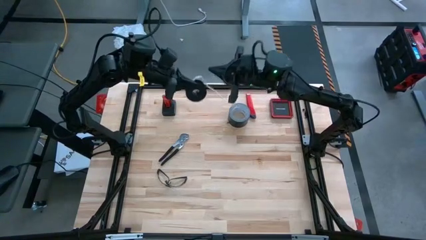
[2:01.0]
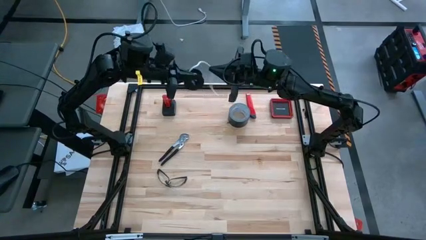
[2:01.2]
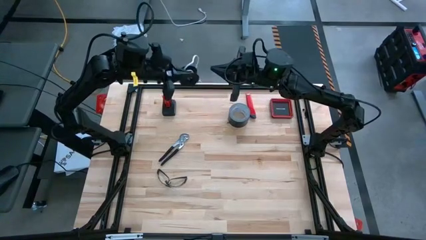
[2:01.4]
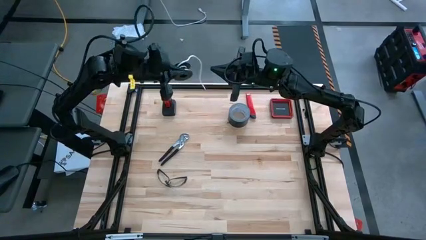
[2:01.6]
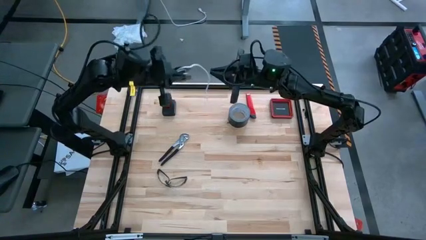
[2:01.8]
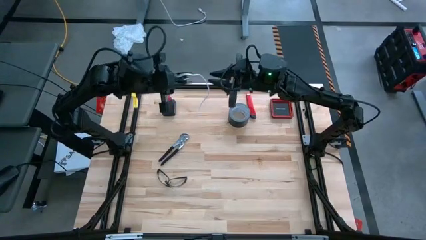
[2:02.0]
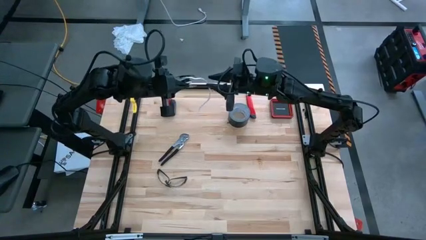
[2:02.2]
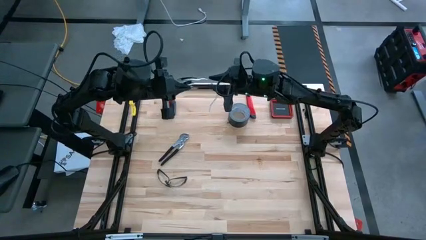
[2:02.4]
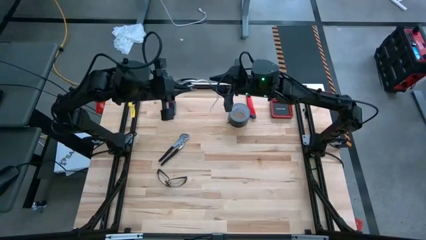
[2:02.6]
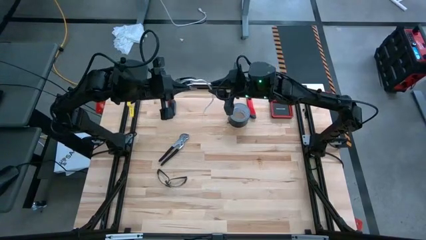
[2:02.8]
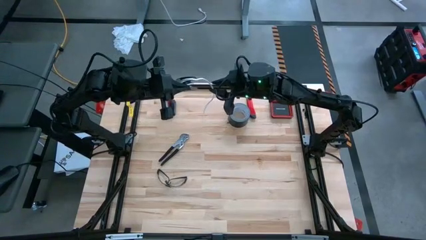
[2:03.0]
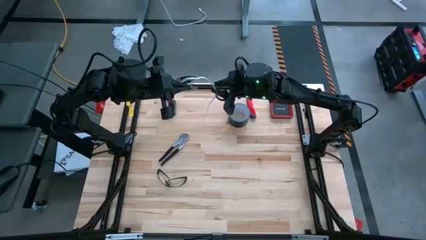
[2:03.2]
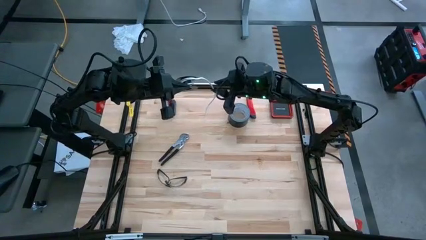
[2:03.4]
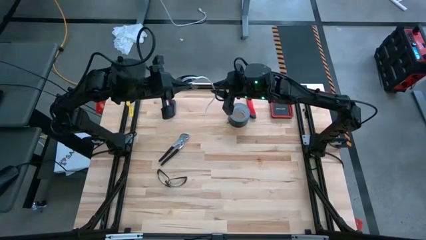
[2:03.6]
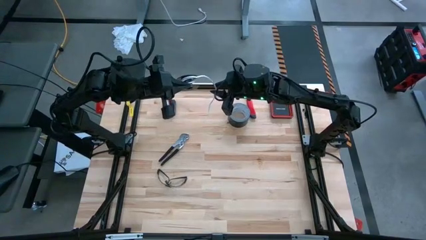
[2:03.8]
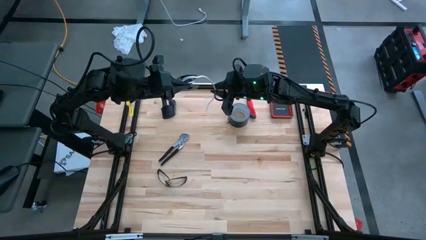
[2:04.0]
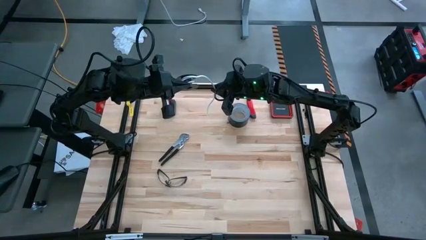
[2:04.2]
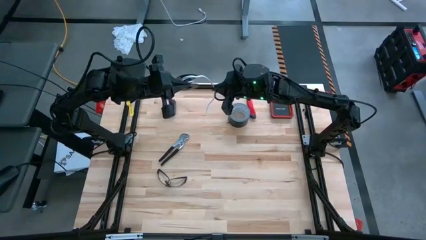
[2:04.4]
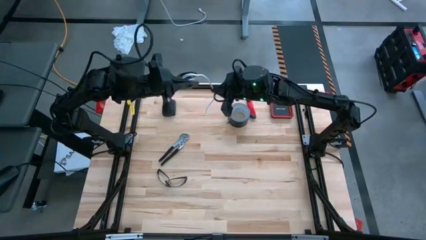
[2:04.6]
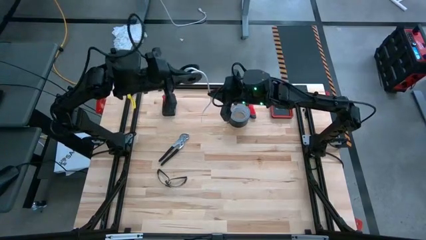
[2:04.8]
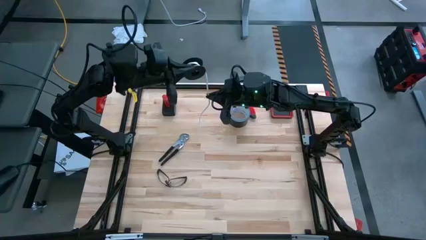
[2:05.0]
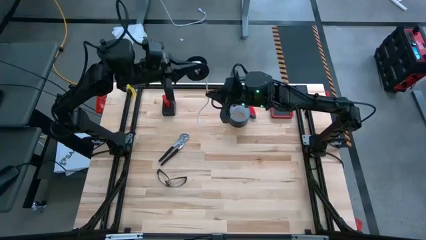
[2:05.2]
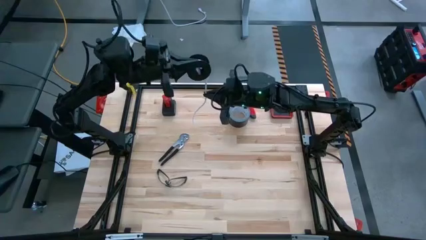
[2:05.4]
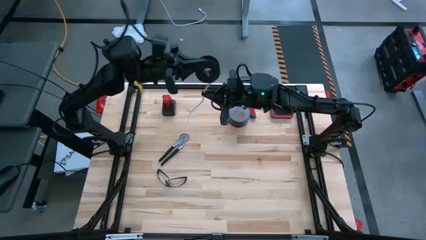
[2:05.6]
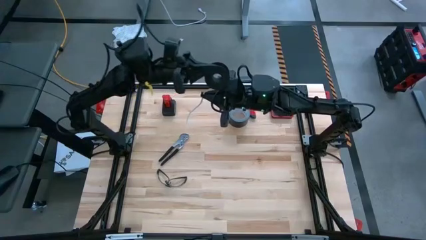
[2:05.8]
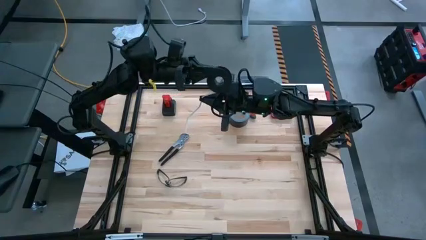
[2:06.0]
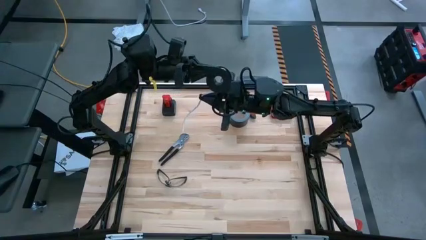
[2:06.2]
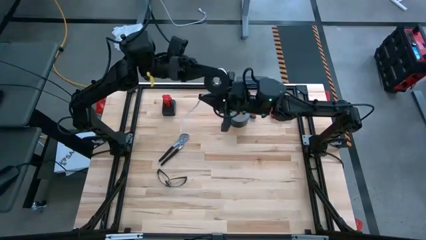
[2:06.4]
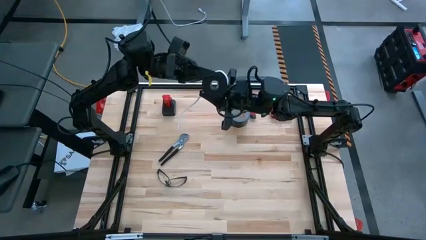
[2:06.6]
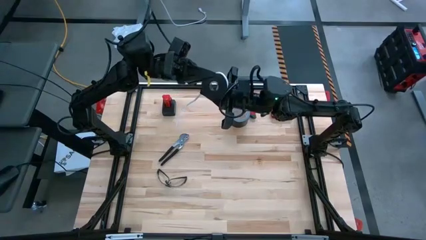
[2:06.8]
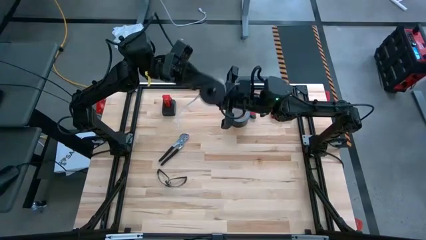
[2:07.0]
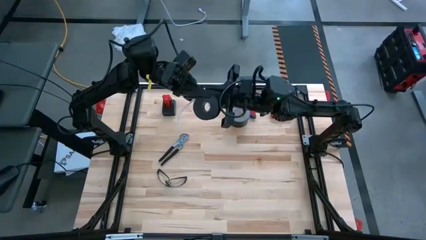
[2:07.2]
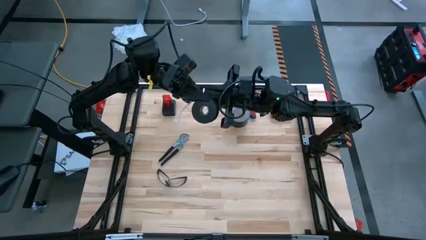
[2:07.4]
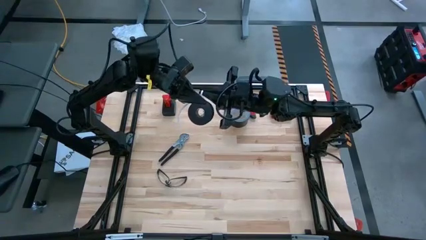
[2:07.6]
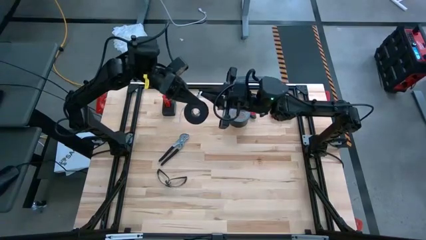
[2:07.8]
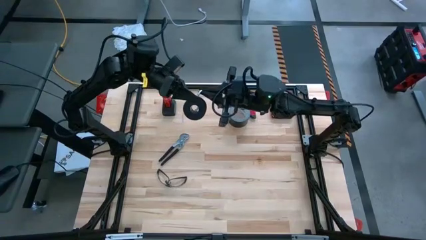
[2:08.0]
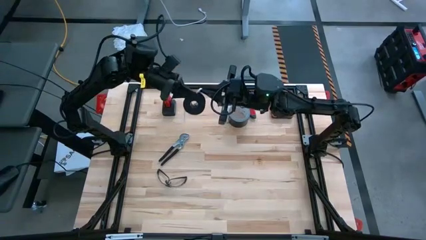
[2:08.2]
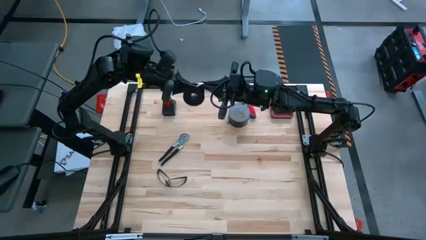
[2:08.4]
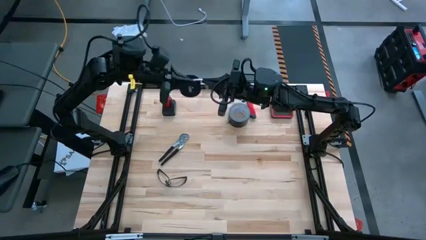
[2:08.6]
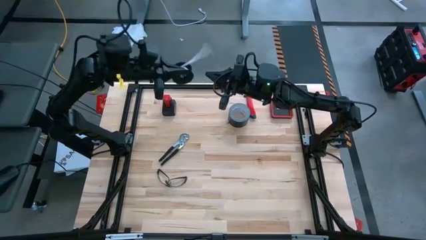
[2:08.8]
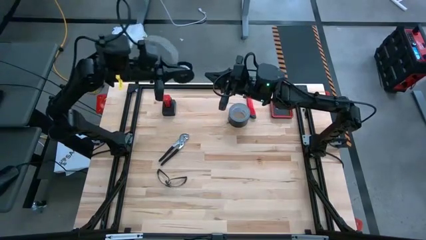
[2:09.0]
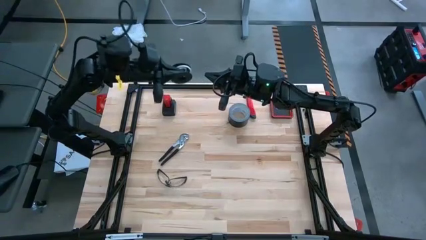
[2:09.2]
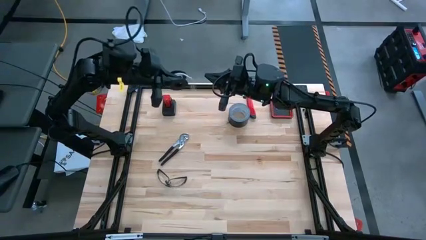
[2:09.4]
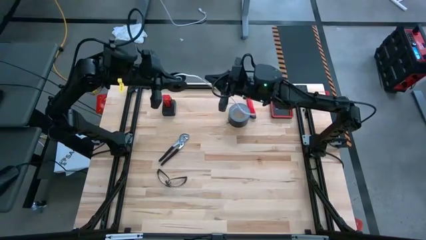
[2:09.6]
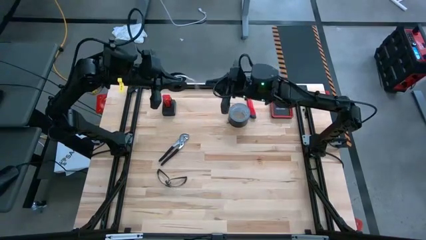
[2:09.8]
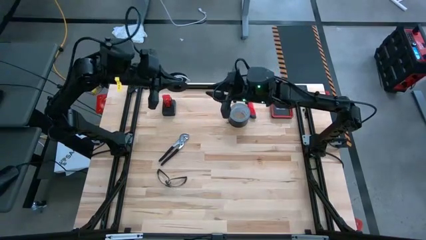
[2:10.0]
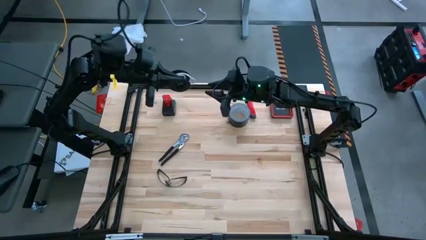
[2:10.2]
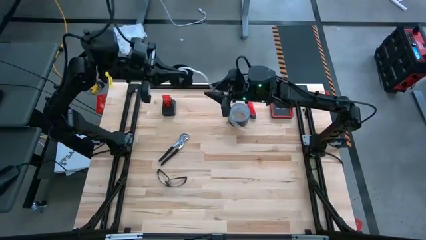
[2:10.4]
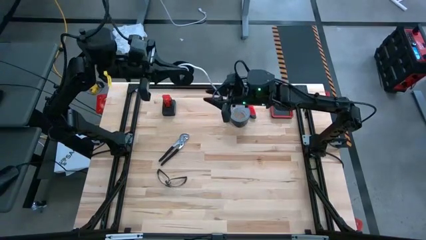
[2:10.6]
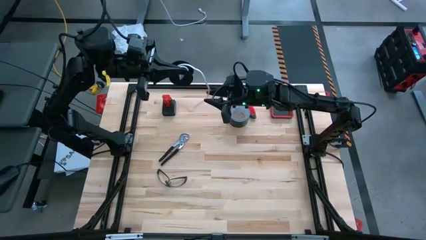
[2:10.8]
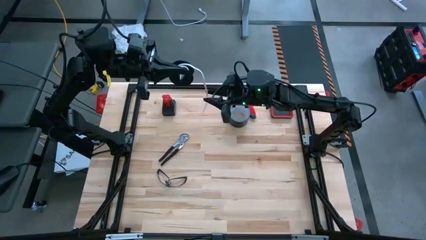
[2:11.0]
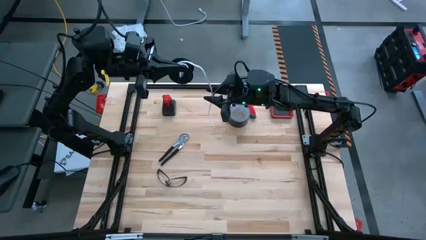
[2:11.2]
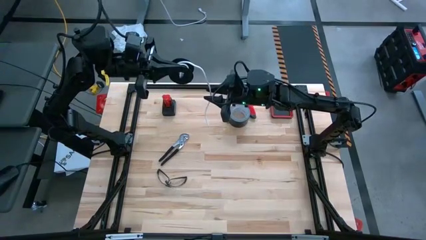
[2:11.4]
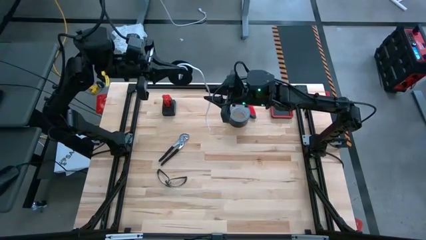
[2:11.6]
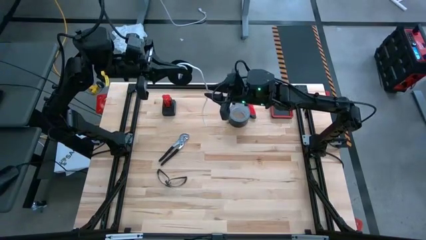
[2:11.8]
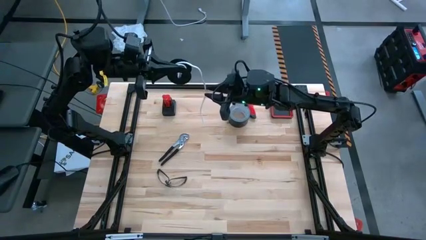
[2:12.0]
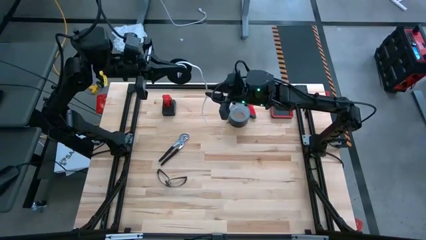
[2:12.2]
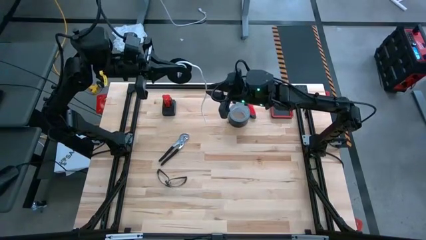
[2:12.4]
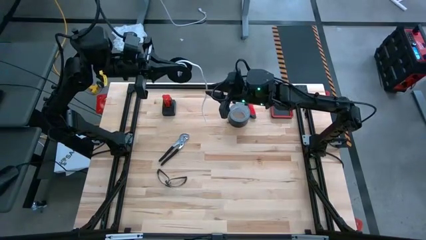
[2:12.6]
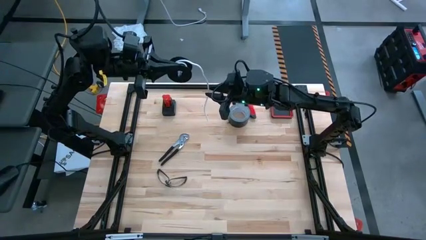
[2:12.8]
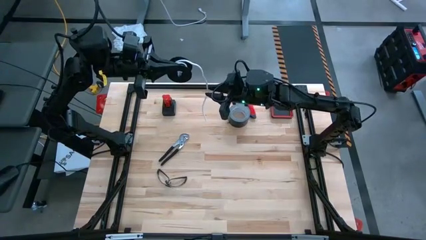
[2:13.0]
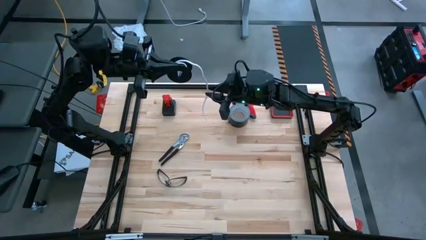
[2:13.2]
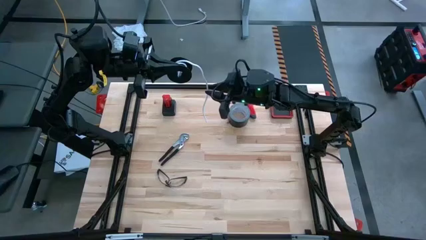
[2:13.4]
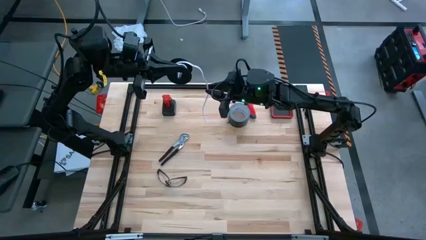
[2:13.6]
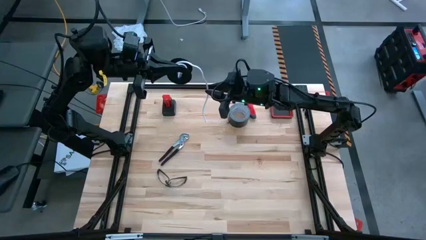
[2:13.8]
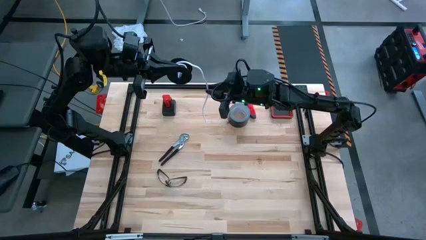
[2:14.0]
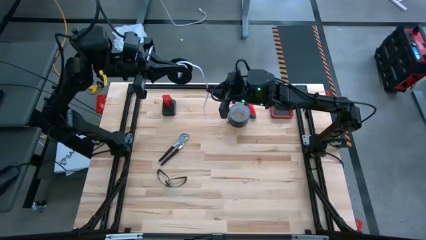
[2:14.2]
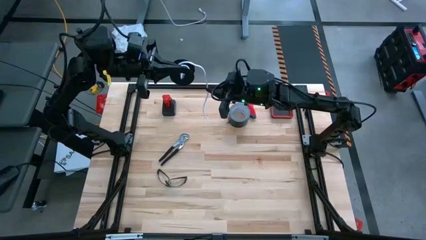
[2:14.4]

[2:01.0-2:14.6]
Task: Coil cords
Coil the white wire onto the black spool

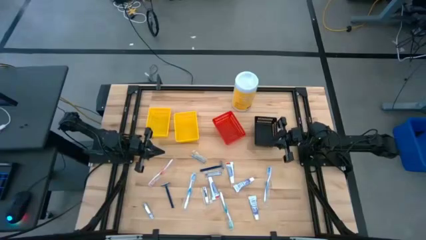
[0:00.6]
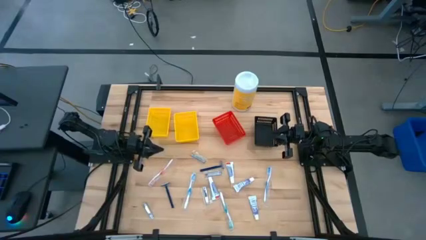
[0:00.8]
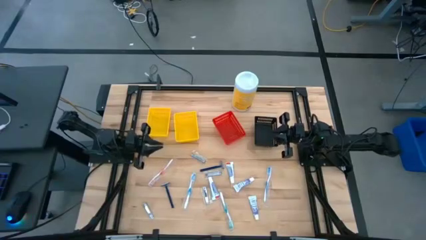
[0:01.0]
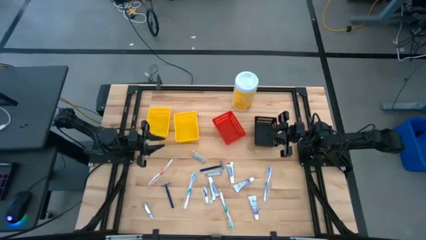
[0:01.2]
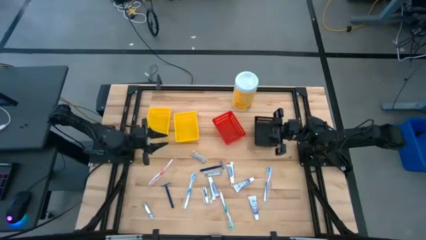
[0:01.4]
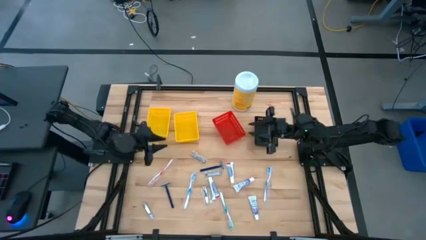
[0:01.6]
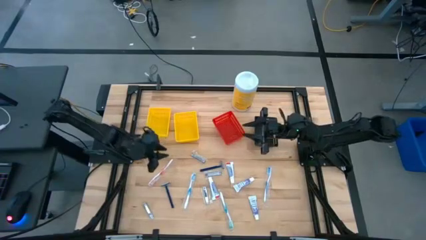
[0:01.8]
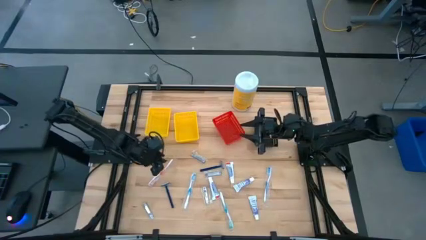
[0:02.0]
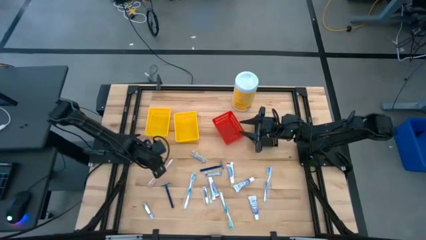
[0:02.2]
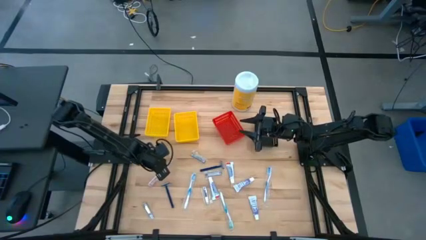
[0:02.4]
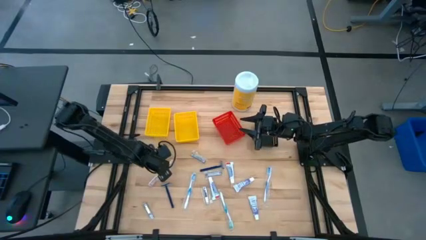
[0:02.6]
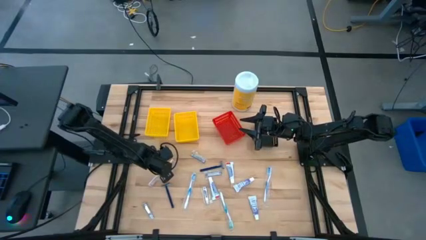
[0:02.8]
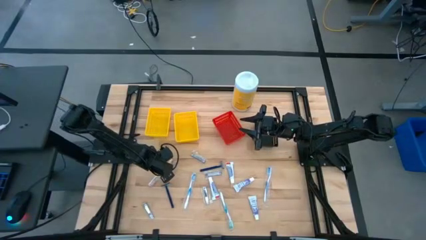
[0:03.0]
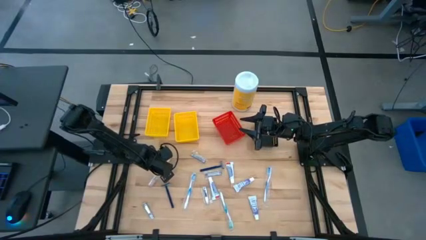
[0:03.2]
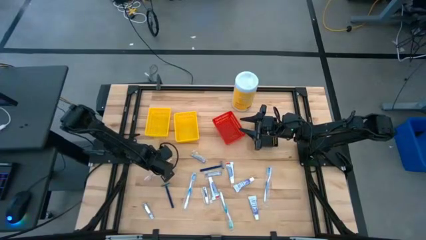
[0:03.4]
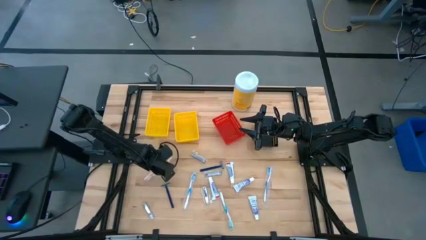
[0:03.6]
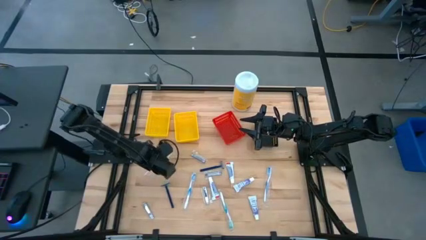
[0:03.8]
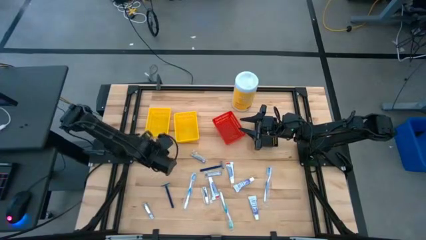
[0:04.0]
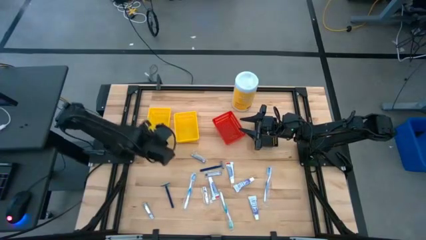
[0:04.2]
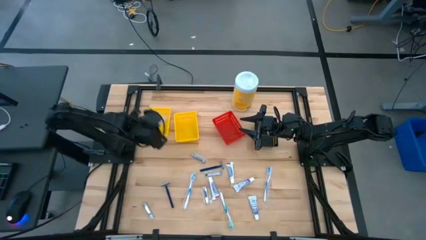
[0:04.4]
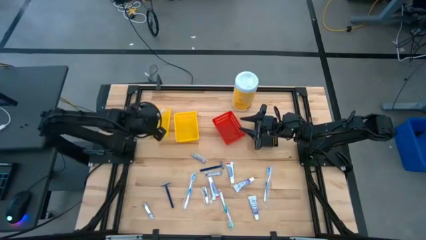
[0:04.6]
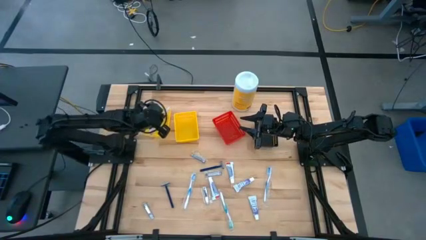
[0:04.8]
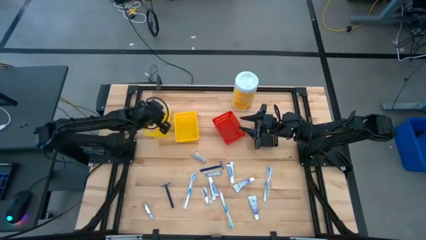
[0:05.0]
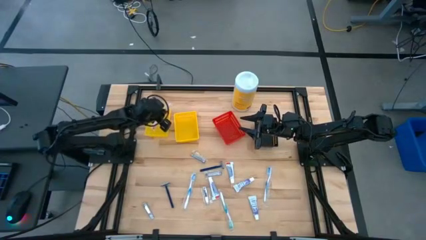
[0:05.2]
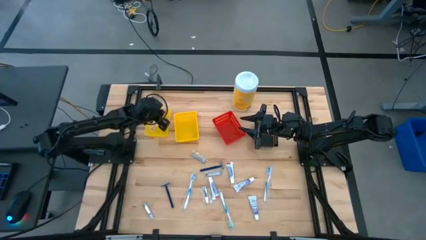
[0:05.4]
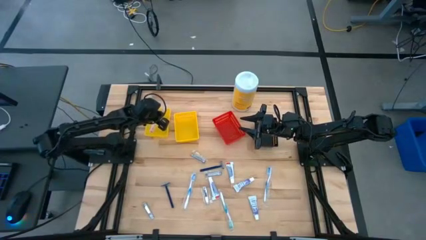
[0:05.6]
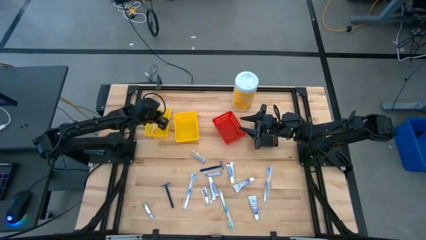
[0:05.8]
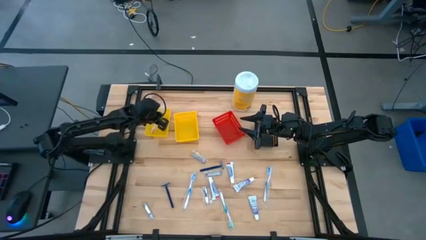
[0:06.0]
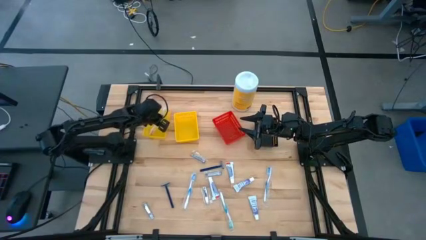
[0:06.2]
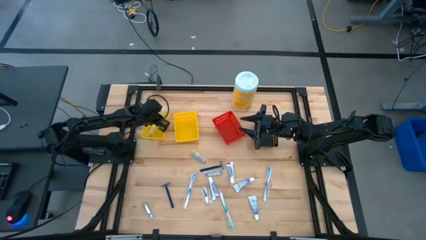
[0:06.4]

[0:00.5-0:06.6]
Task: Pick & Place Travel size toiletries
Put the red toothbrush into the left yellow bin
